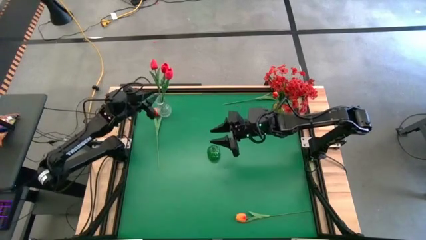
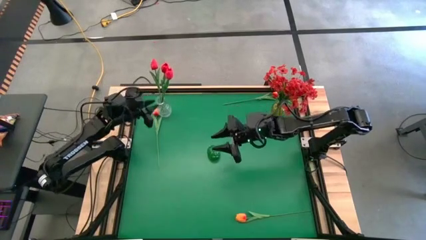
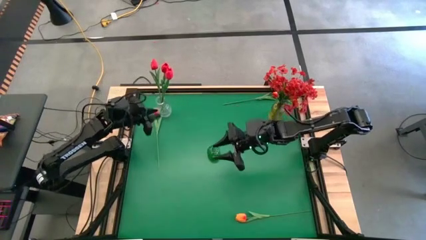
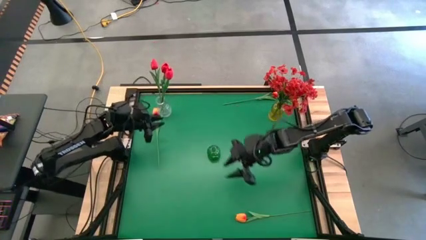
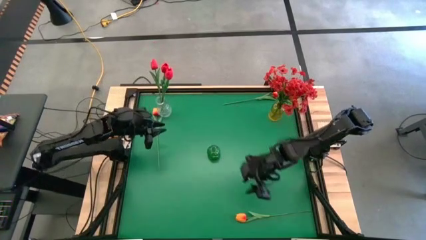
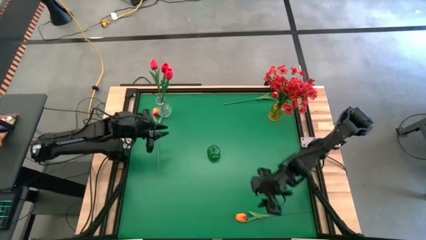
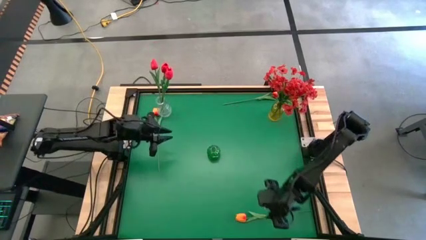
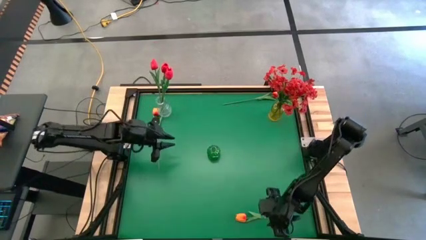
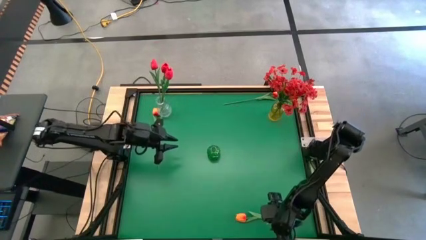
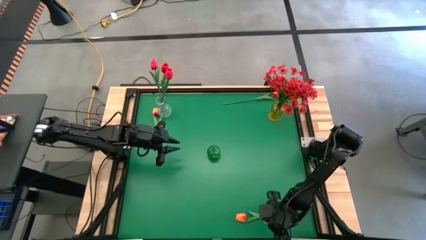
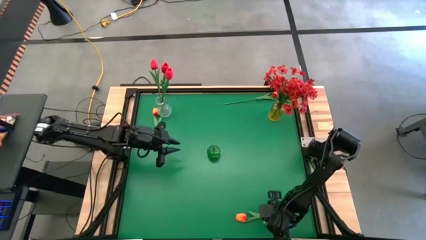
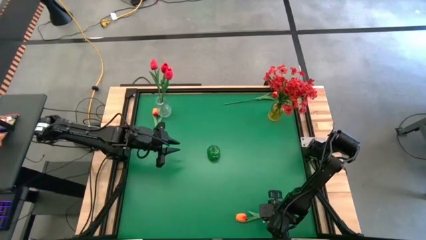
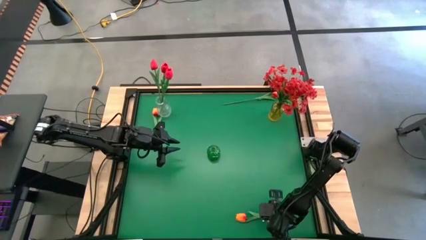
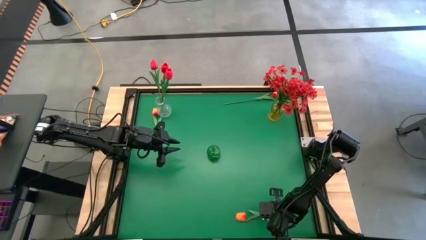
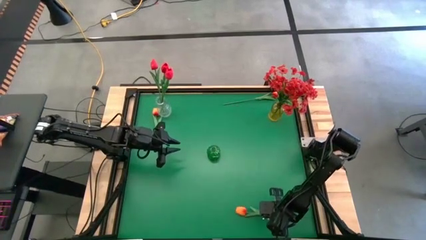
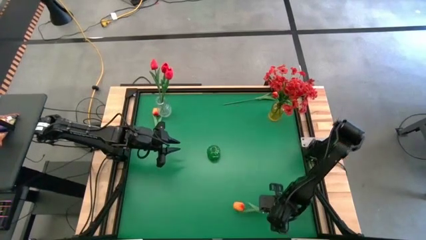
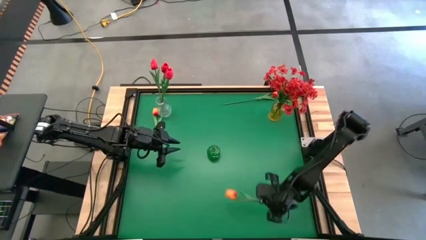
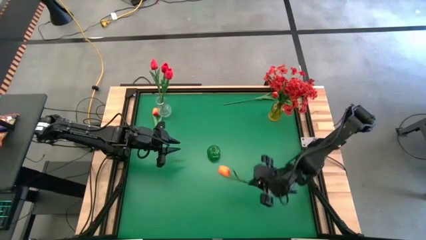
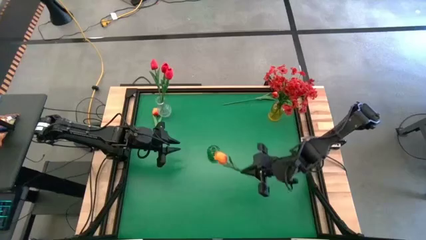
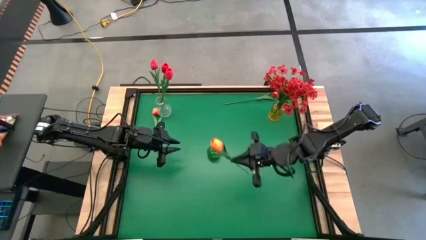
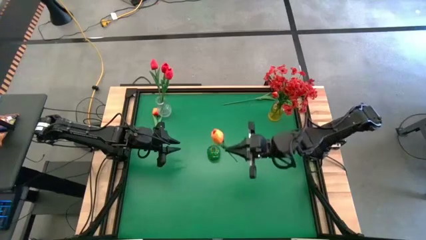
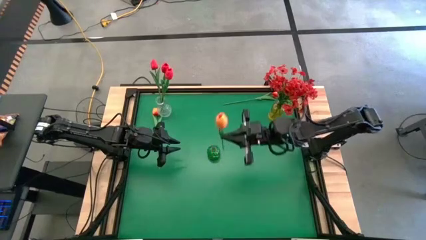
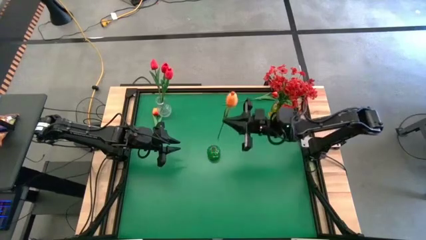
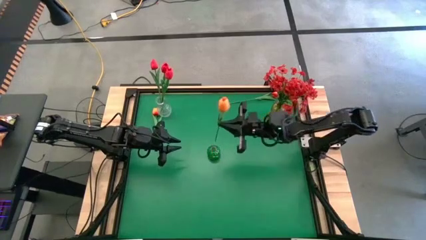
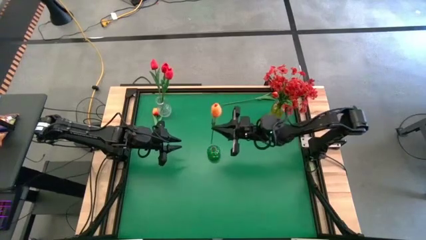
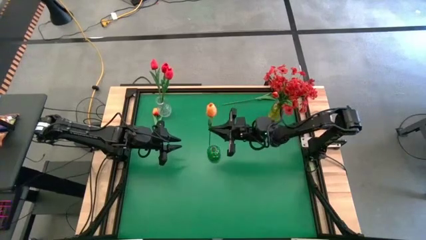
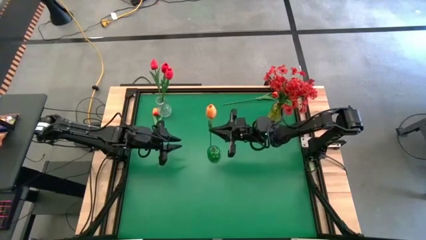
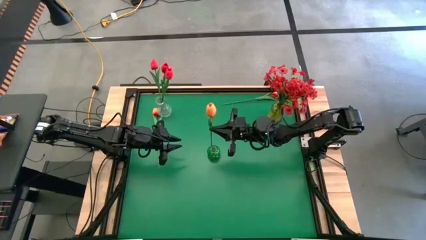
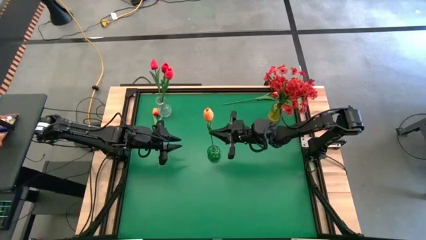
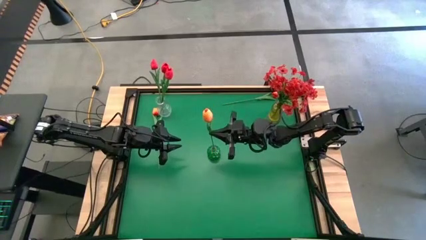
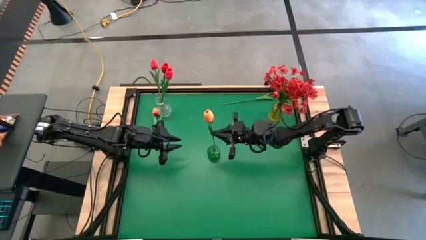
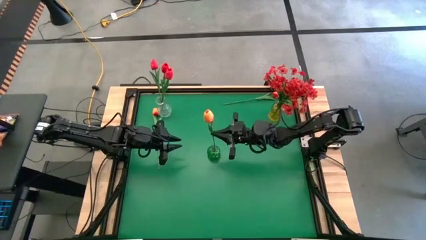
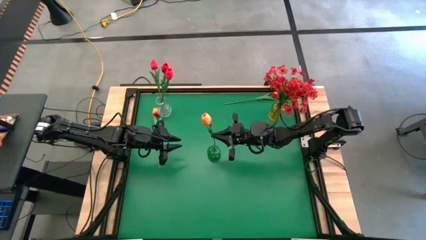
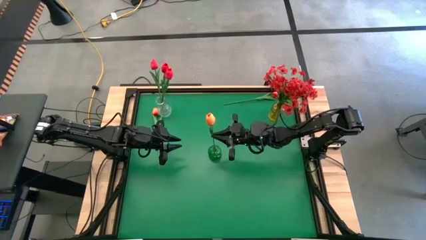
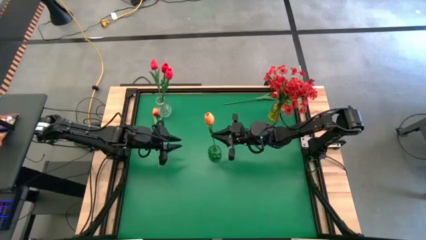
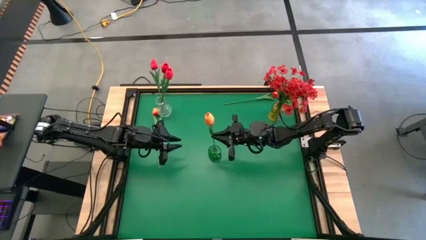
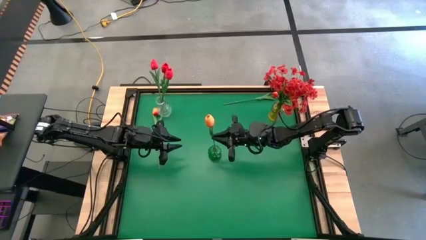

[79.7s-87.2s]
Task: Sort flowers into vase by color
Put the bottom orange tulip into the green vase

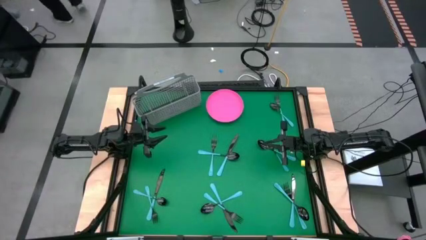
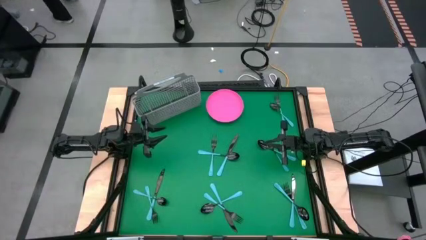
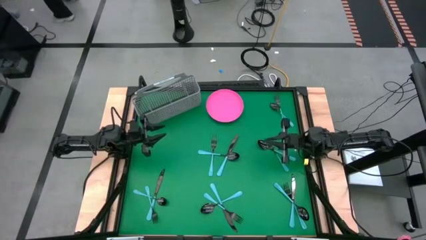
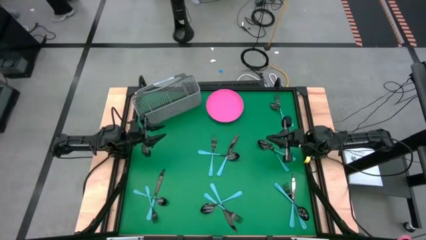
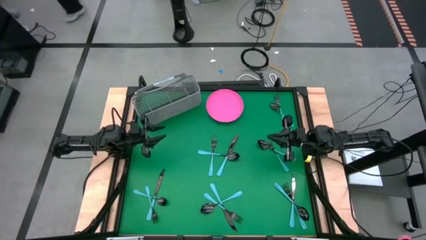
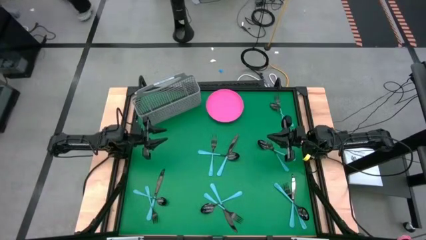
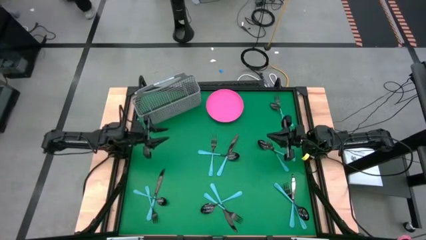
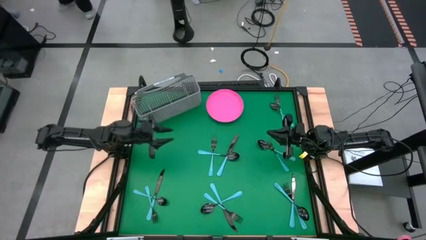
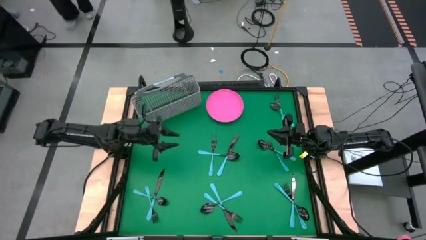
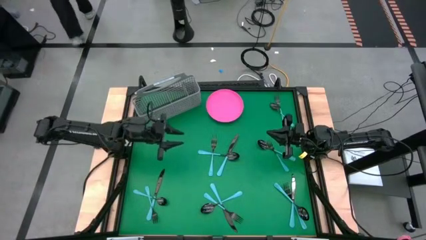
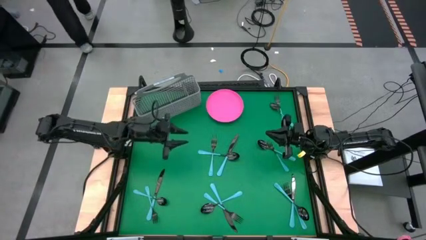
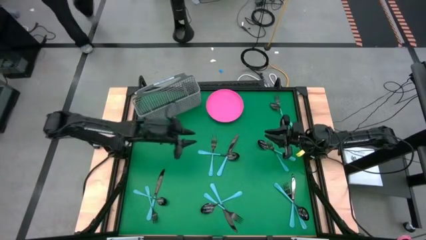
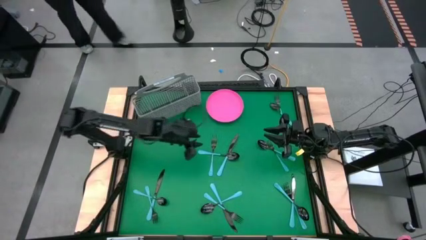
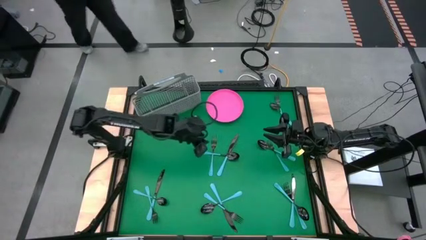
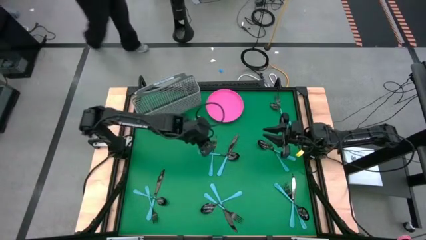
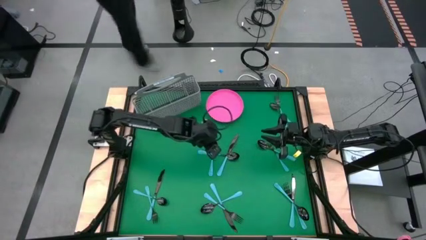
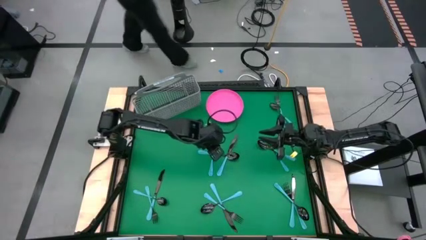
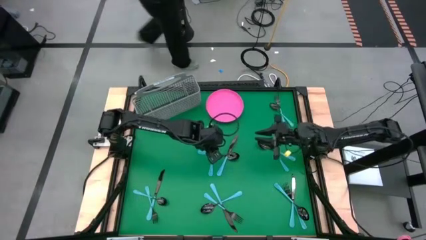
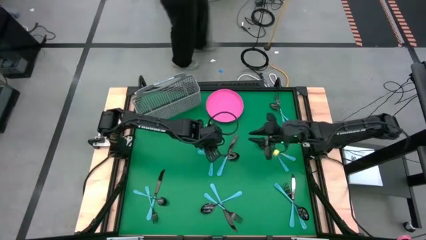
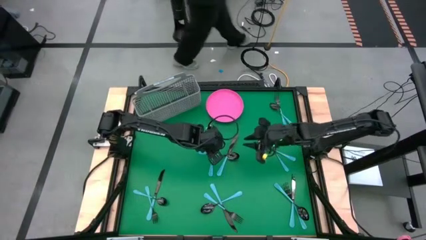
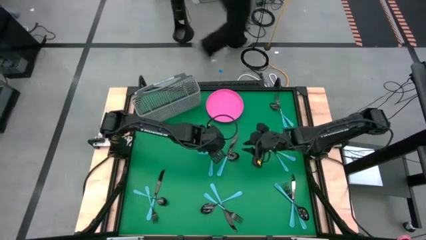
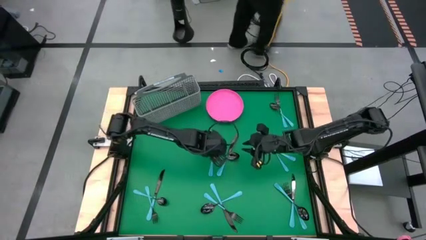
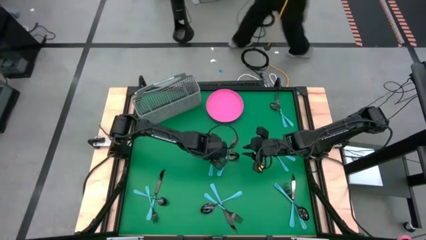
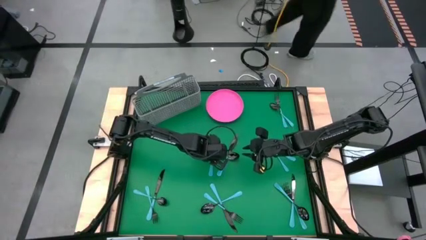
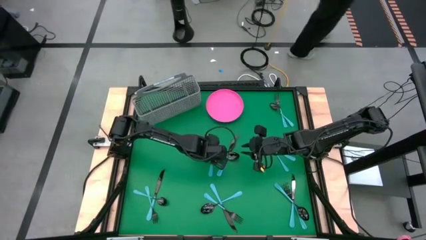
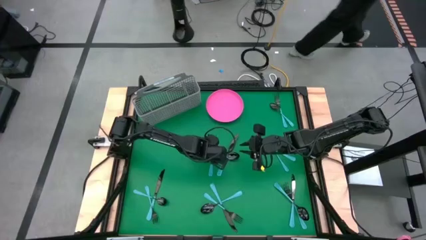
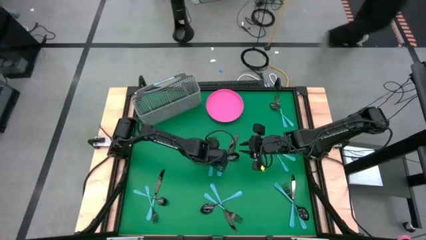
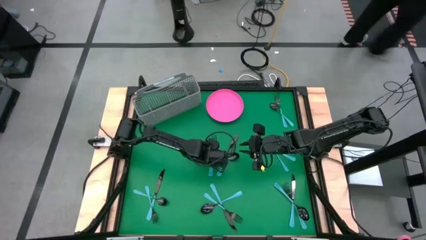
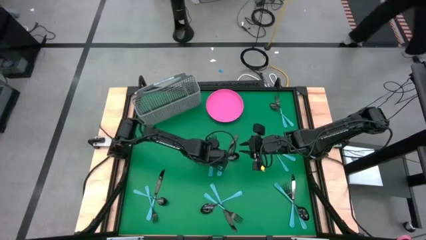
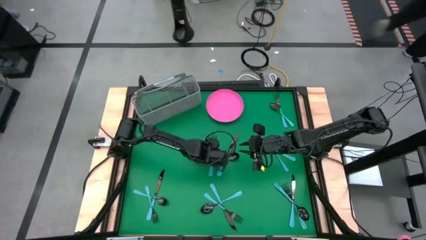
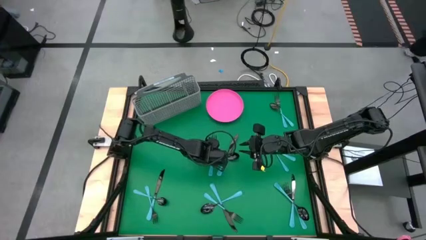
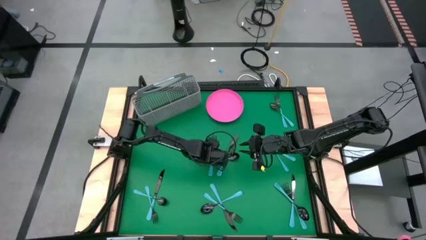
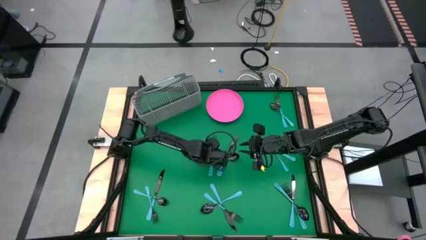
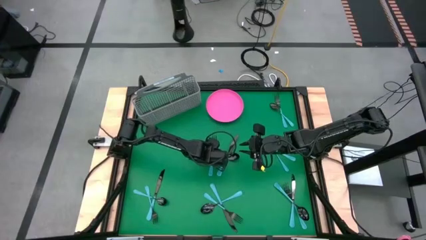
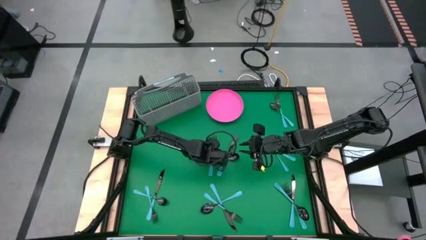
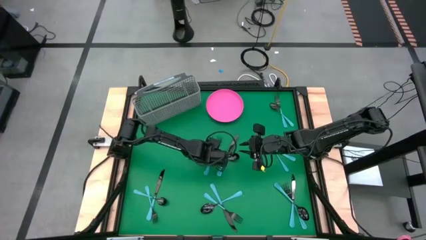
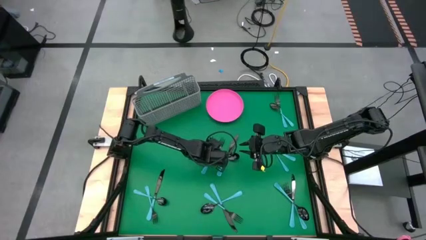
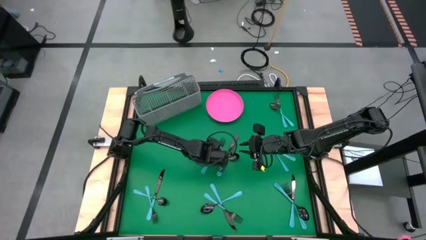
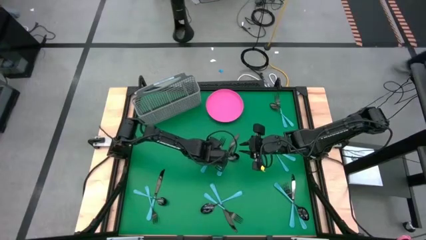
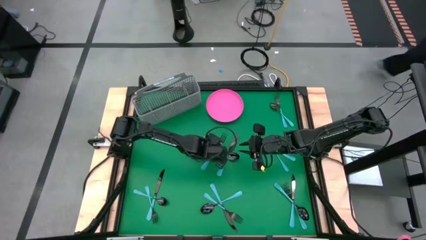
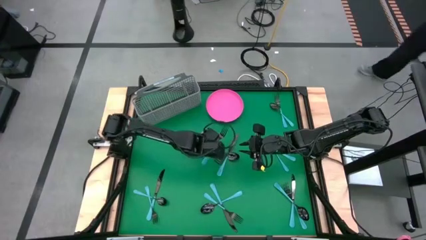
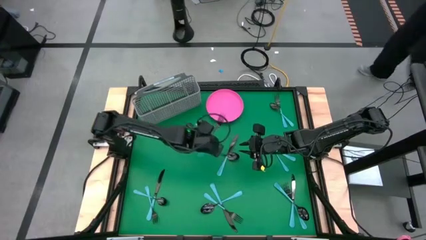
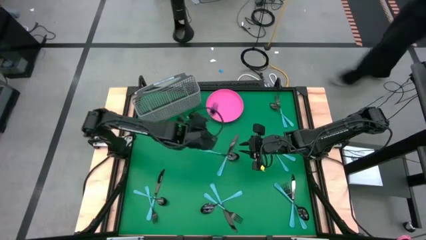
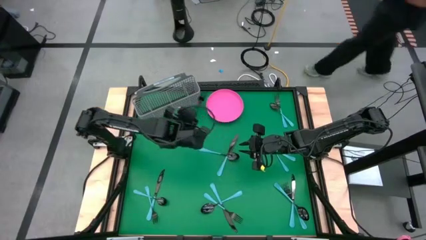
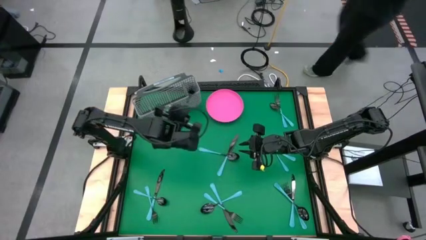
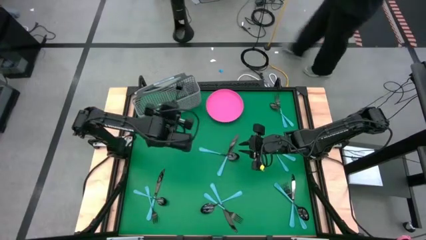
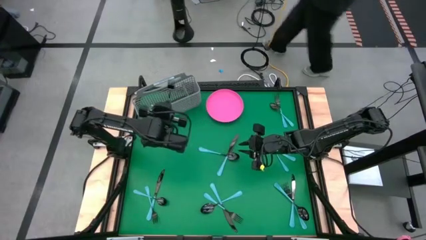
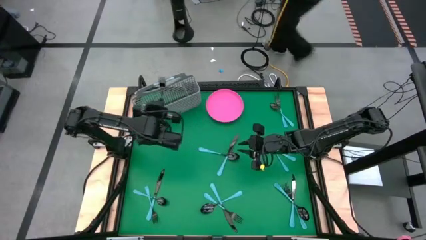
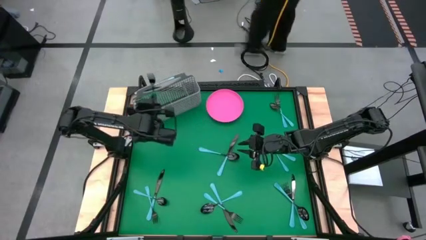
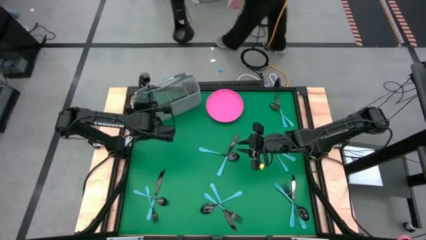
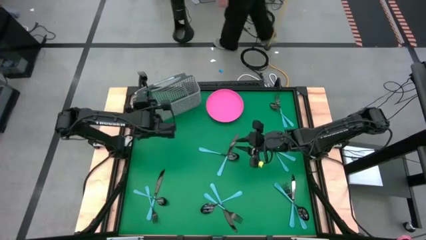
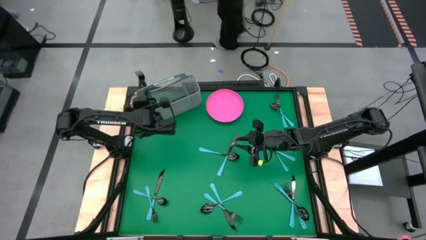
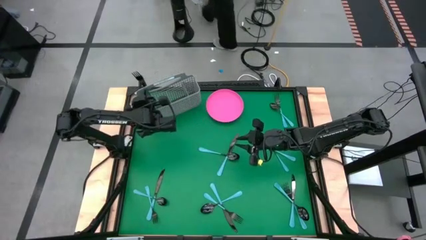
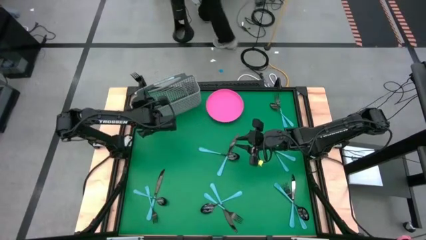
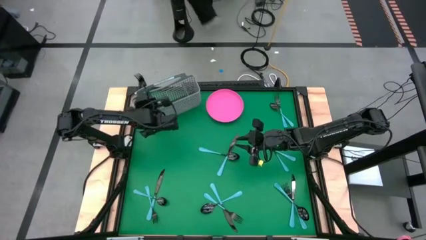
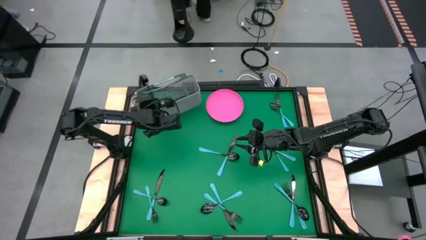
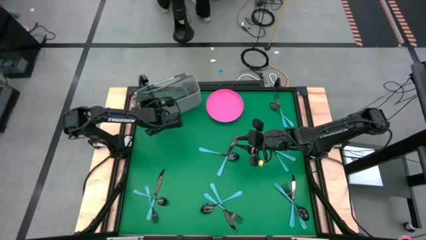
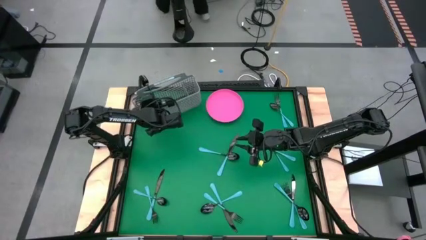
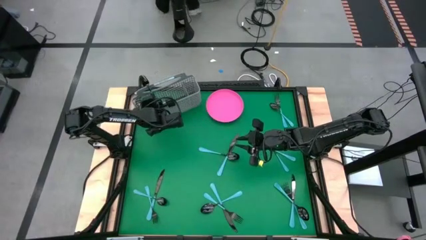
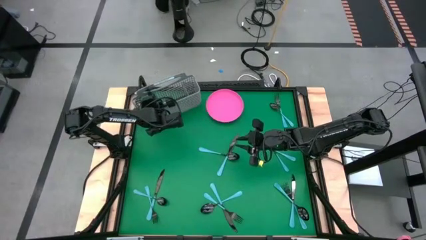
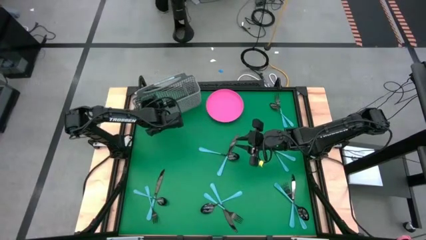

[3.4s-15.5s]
Task: Sort silverware
Put the blue fork into the gray silverware holder
